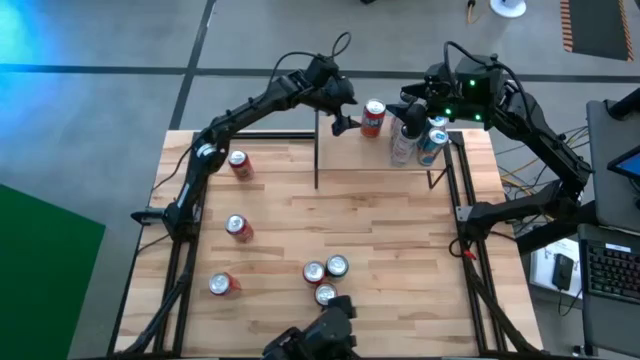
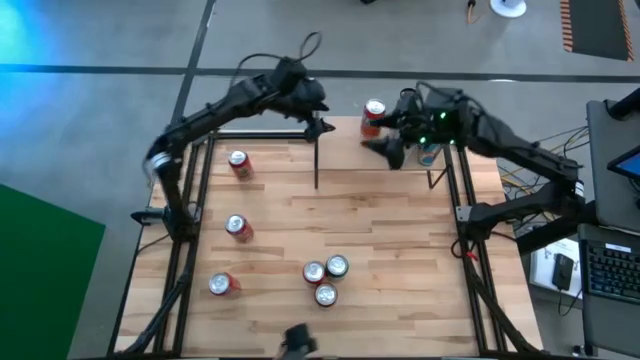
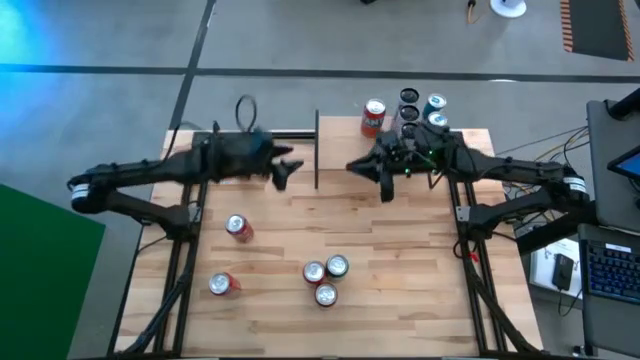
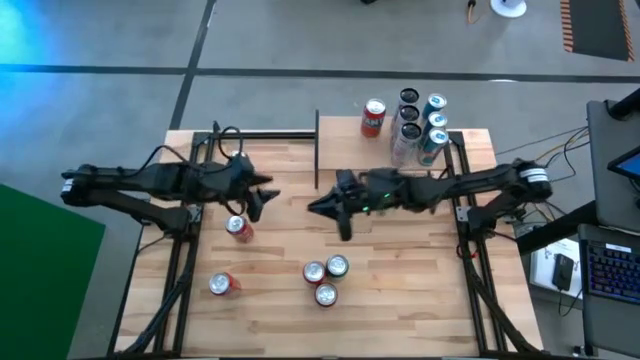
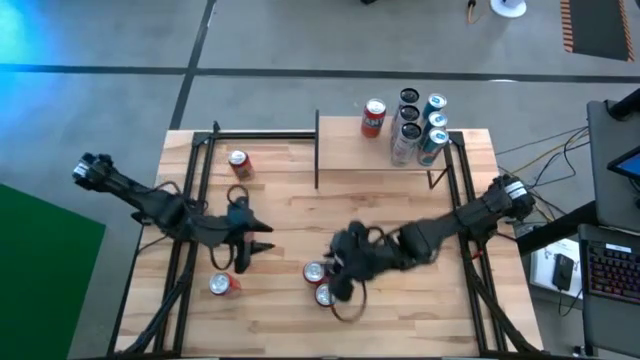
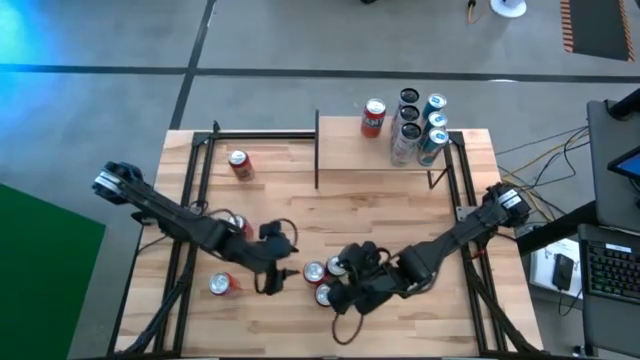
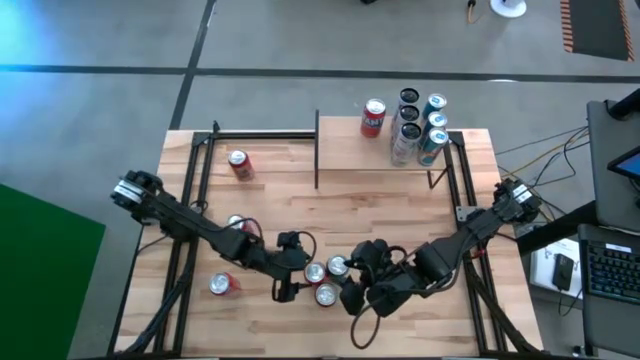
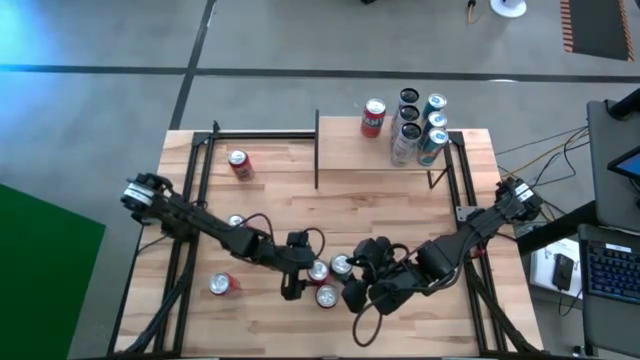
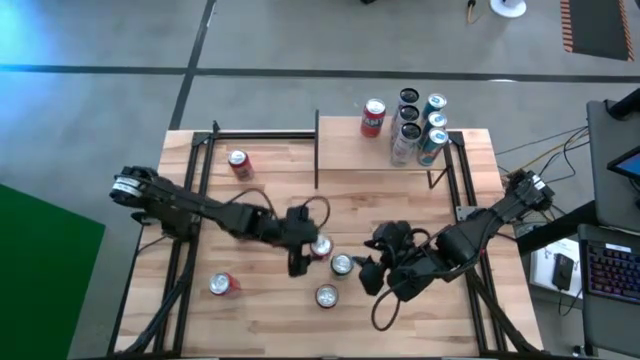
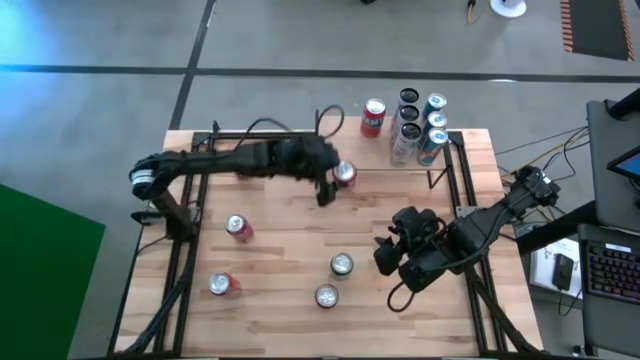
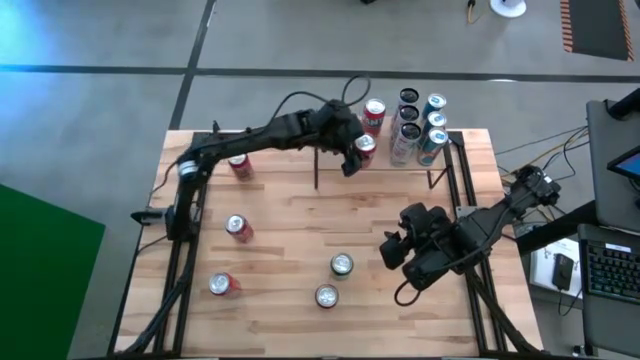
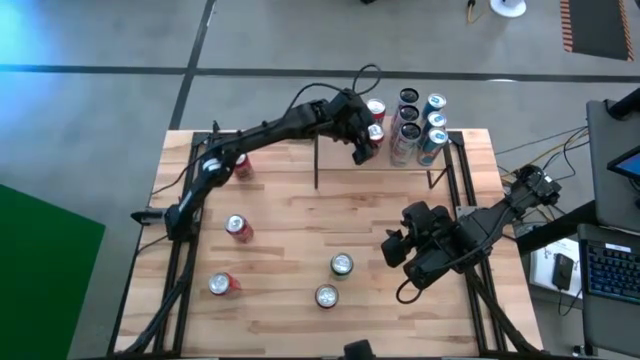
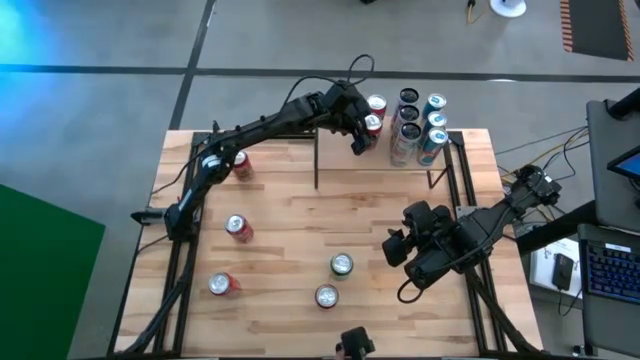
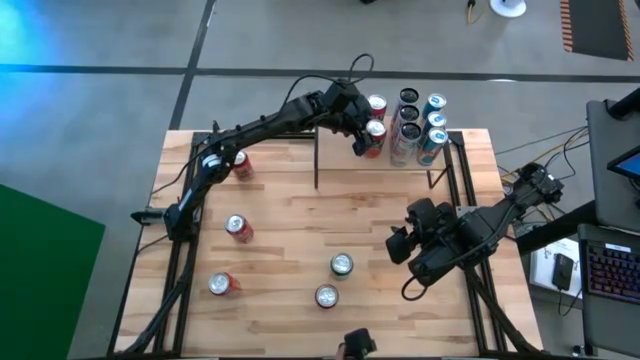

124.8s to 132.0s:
Task: Place canned beverage on shelf
Put the right red soda can on the shelf aligned with the other red soda can

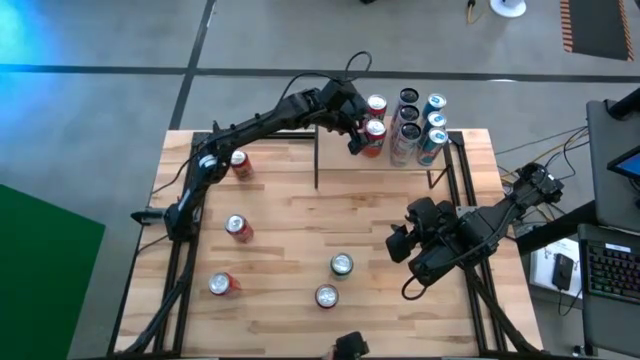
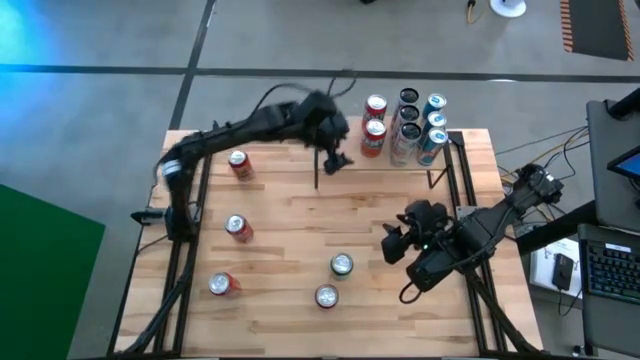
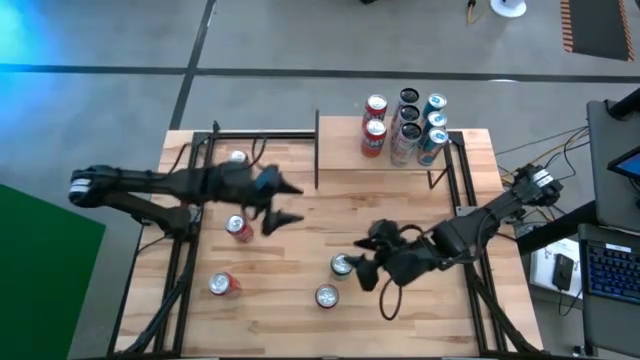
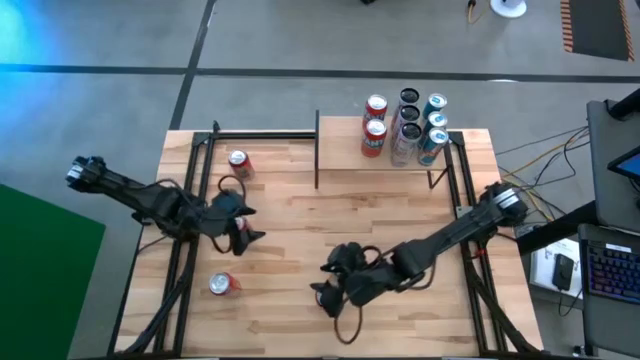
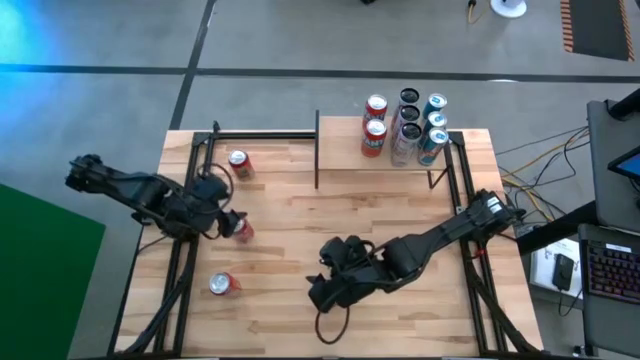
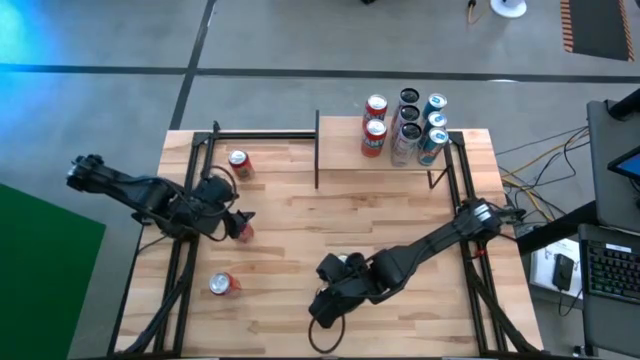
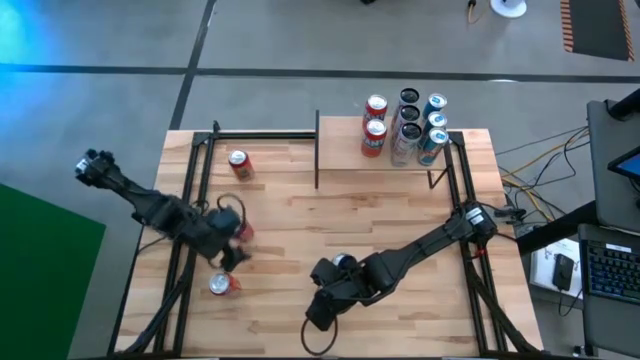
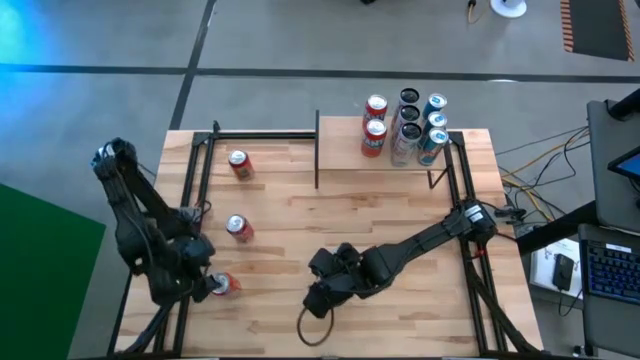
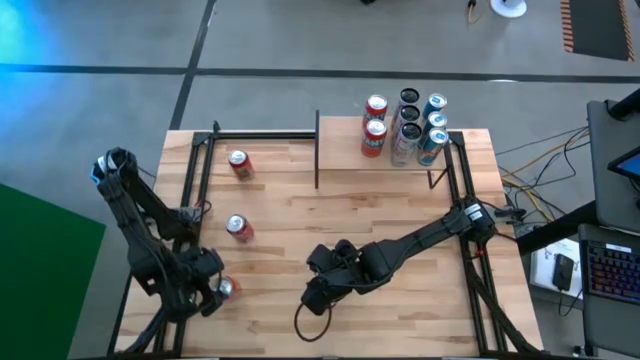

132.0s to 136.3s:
Put the red soda can on the shelf aligned with the other red soda cans

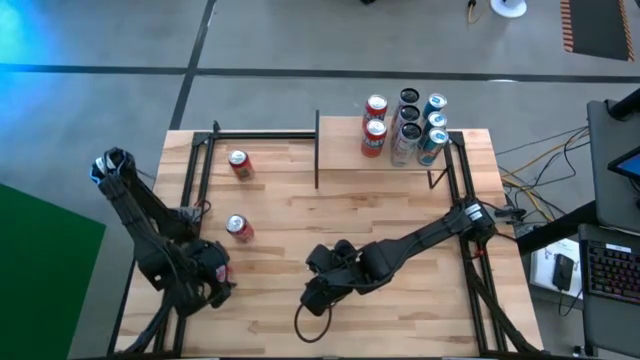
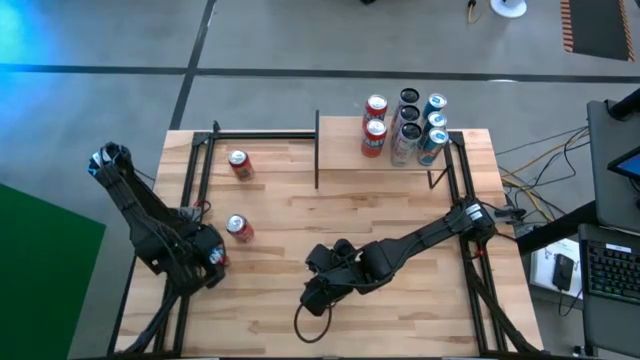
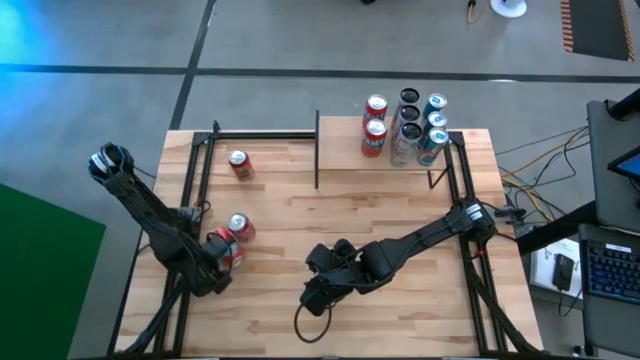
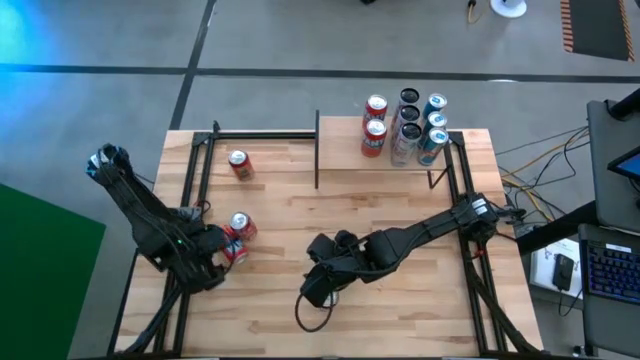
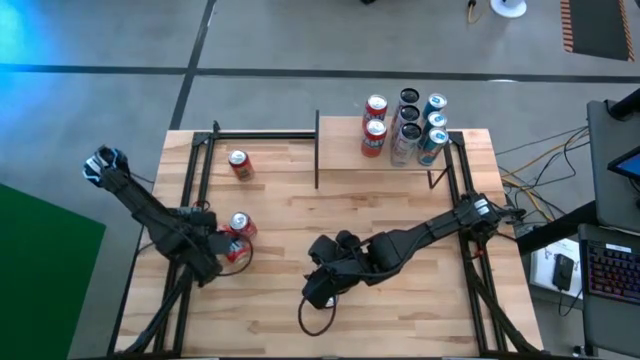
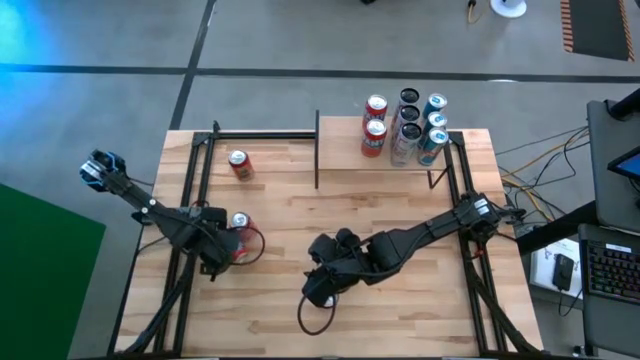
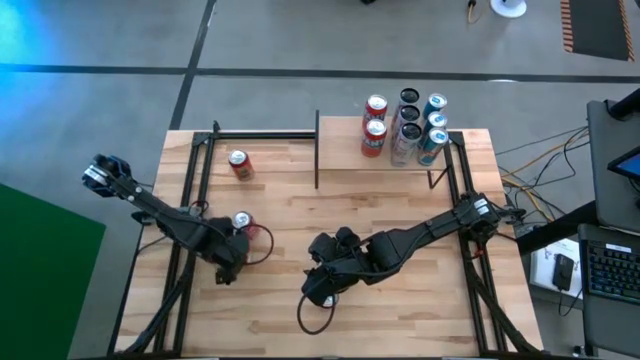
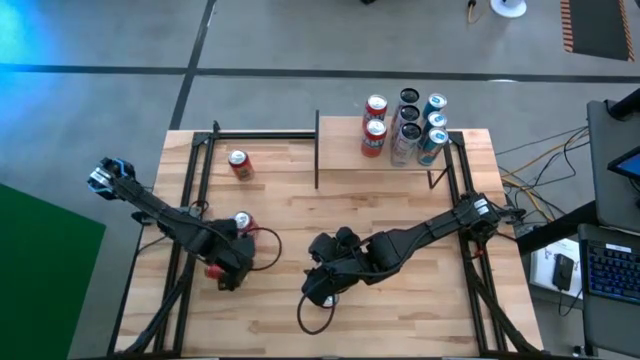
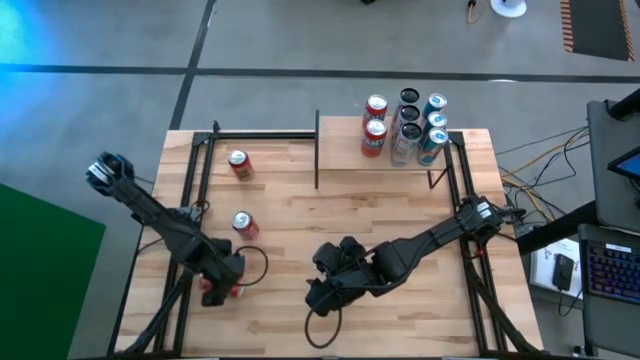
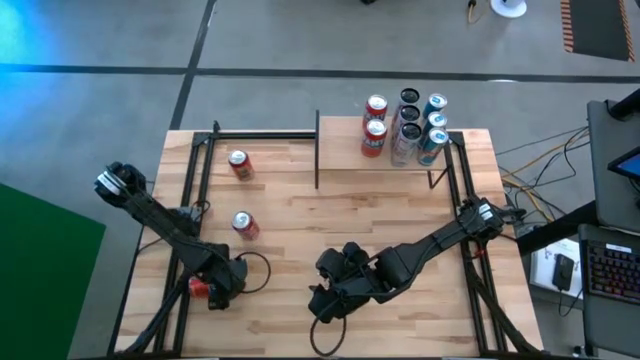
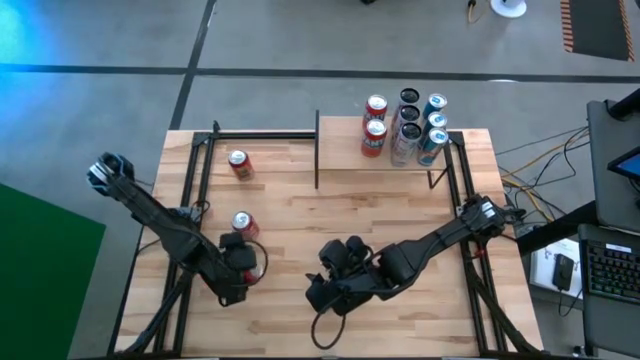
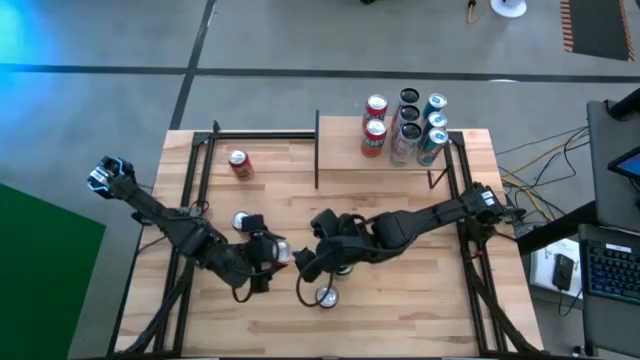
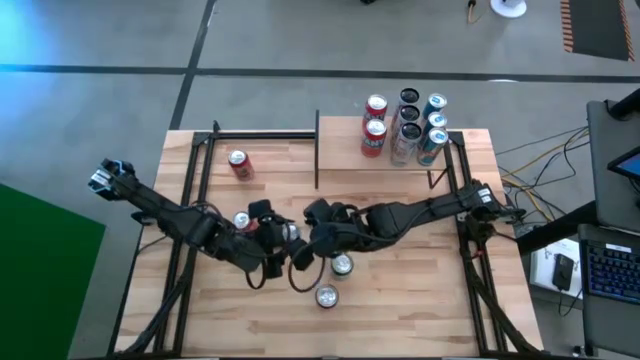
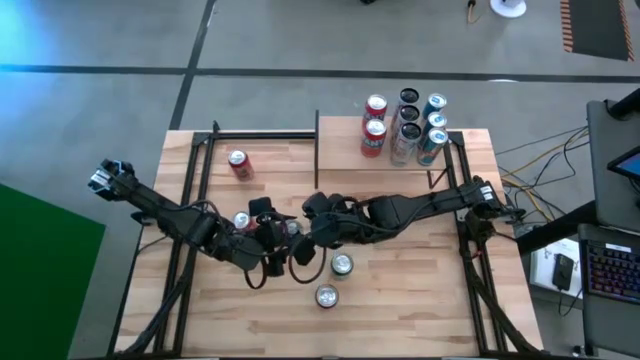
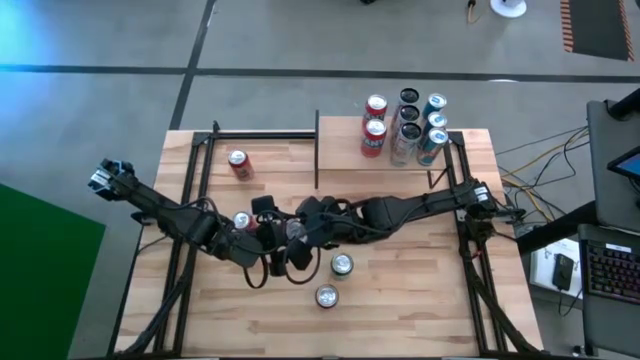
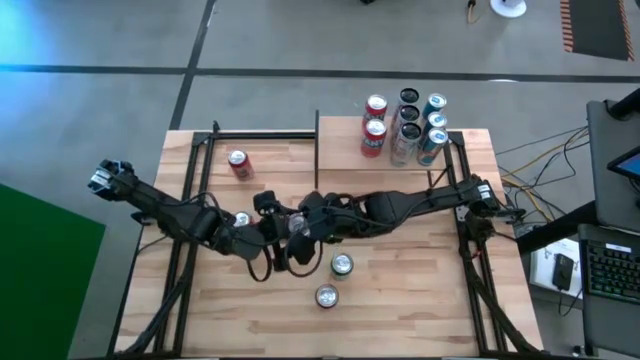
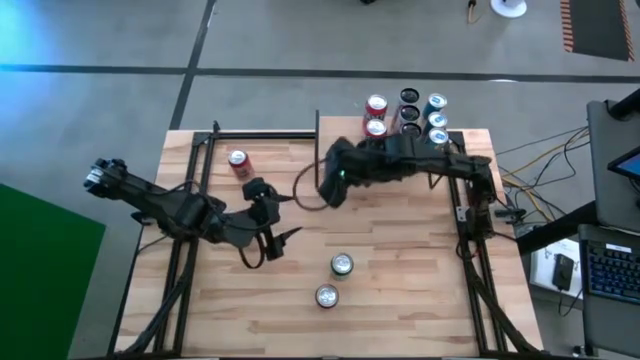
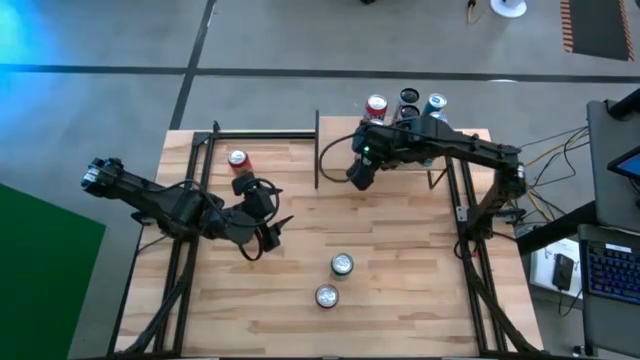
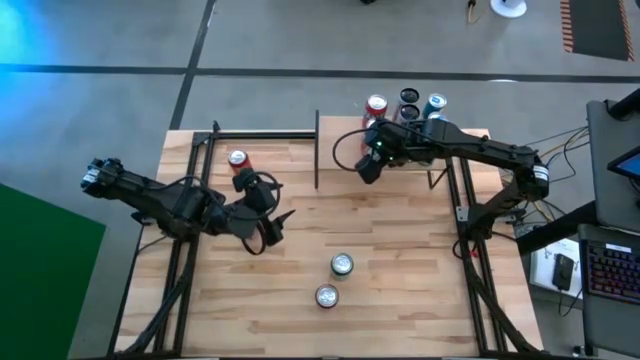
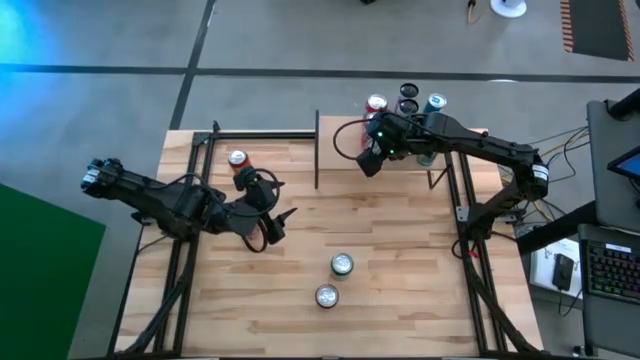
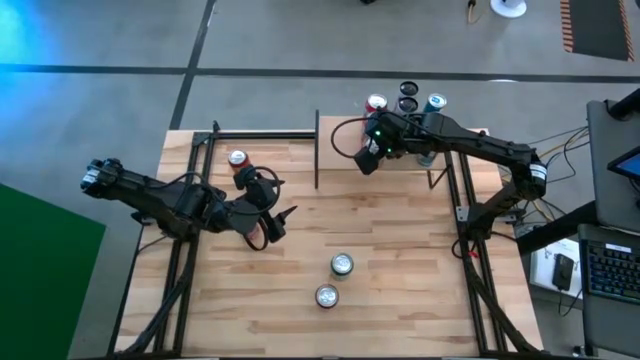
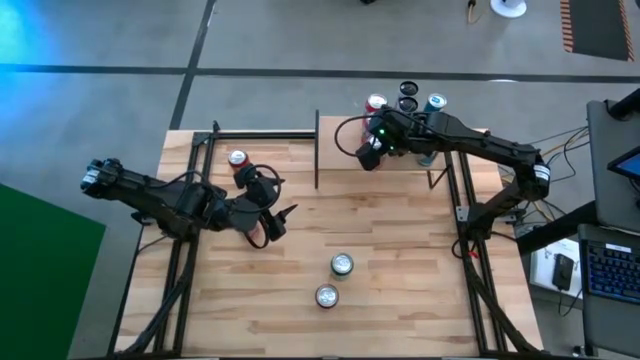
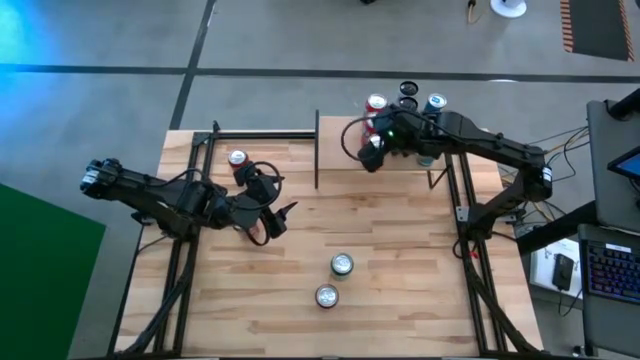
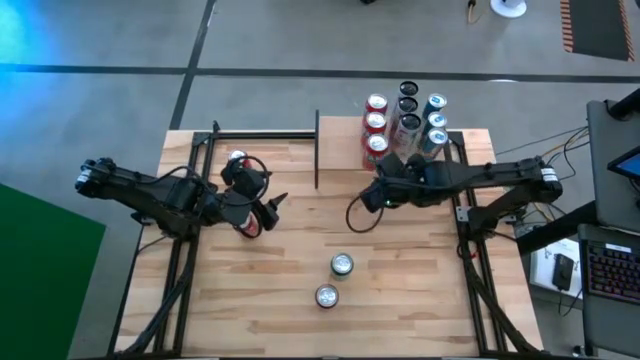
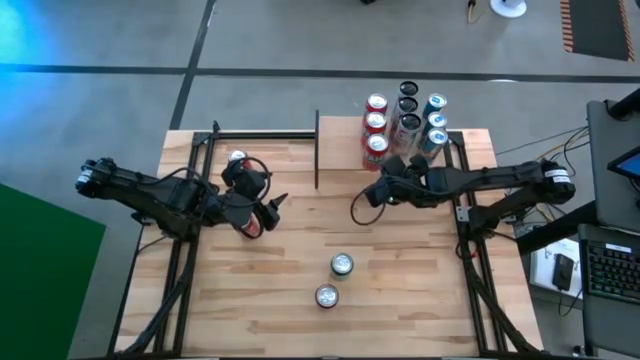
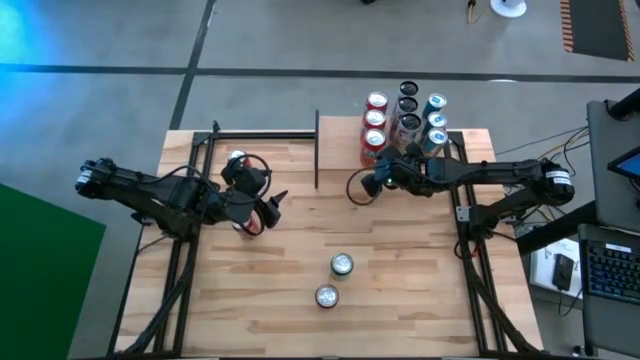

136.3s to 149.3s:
Put the red soda can on the shelf aligned with the other red soda cans
